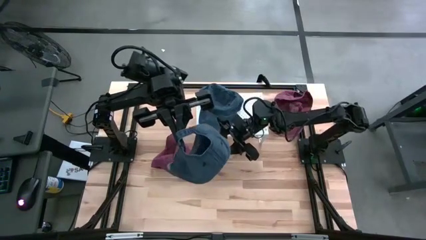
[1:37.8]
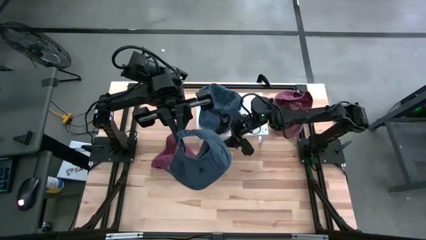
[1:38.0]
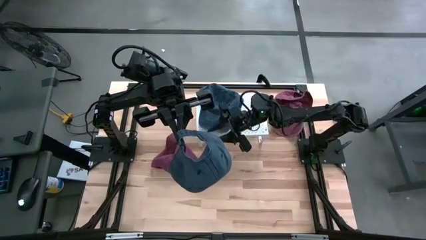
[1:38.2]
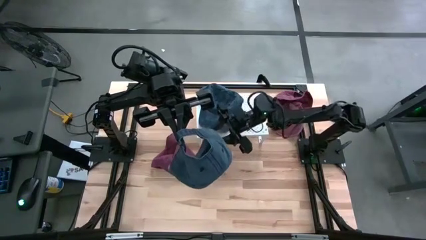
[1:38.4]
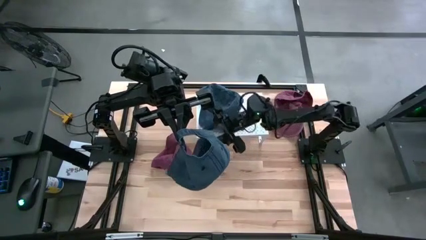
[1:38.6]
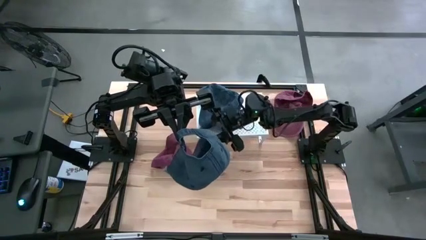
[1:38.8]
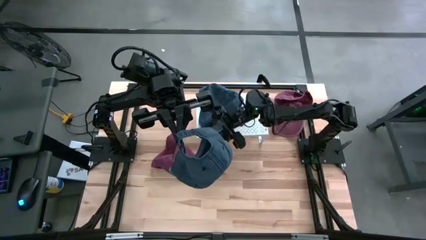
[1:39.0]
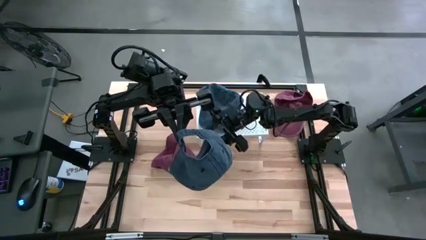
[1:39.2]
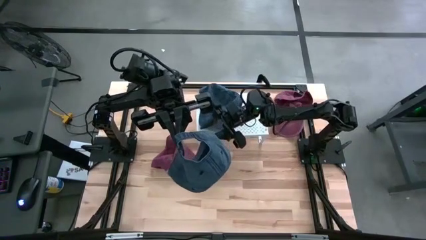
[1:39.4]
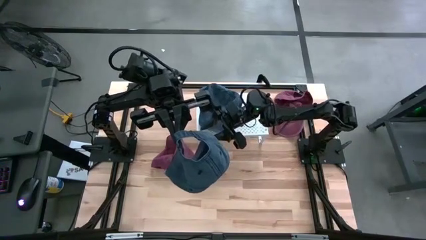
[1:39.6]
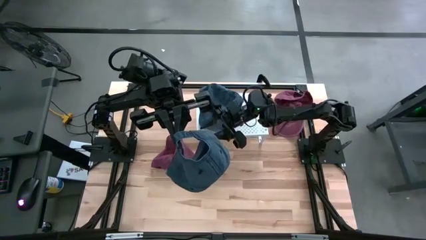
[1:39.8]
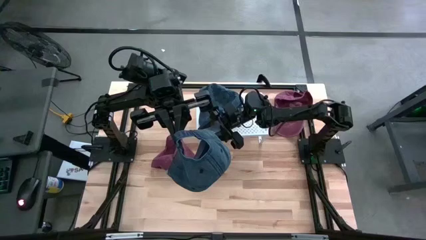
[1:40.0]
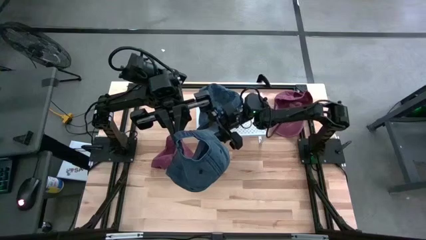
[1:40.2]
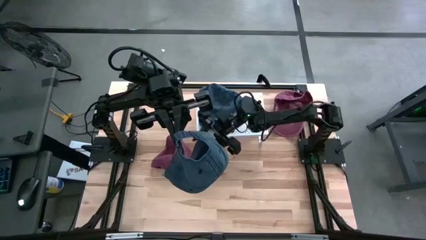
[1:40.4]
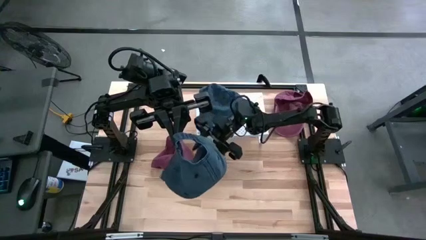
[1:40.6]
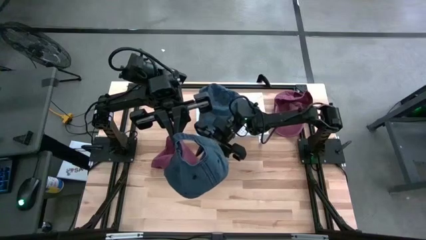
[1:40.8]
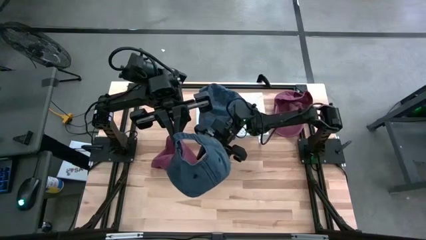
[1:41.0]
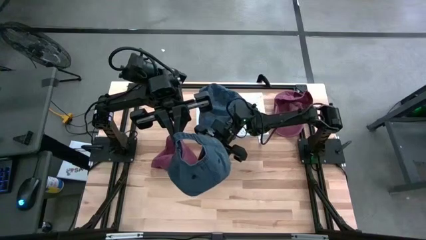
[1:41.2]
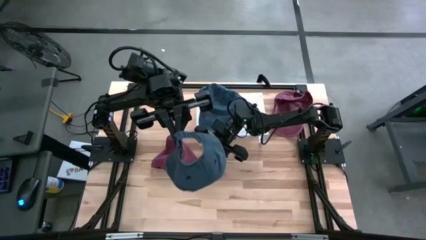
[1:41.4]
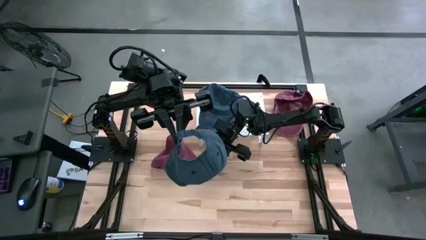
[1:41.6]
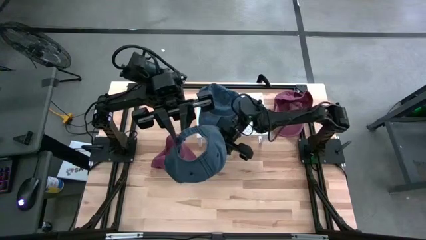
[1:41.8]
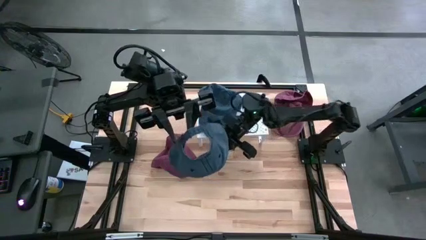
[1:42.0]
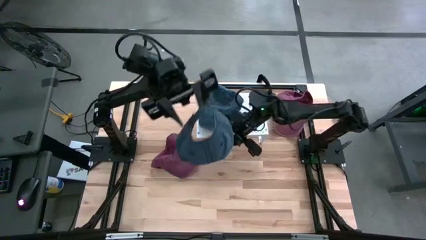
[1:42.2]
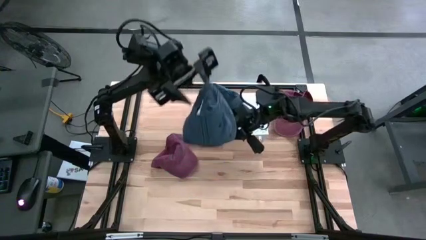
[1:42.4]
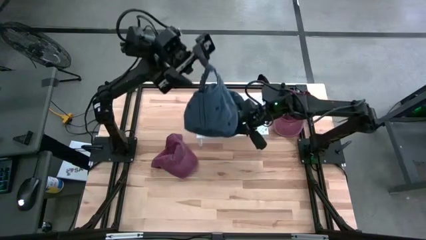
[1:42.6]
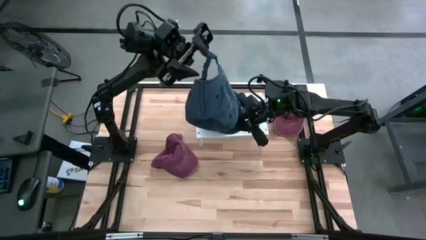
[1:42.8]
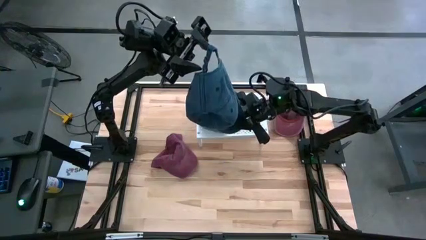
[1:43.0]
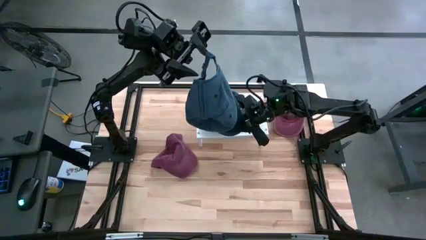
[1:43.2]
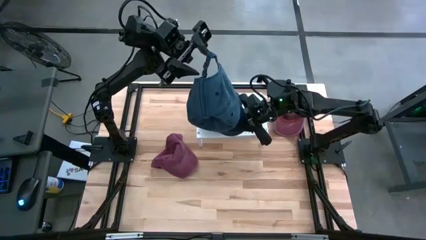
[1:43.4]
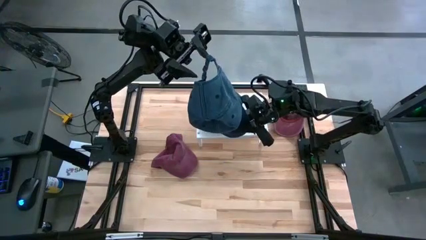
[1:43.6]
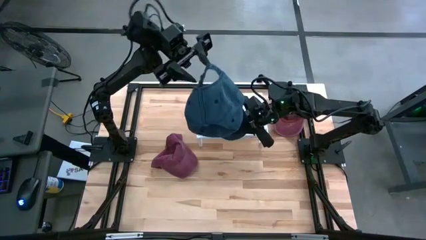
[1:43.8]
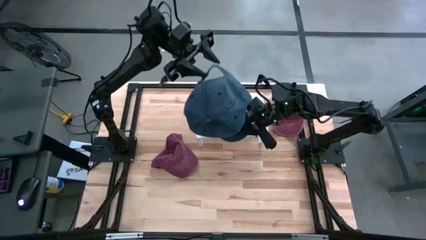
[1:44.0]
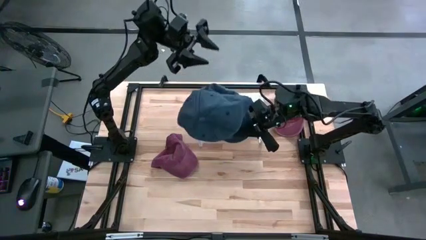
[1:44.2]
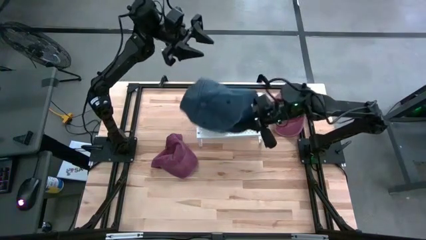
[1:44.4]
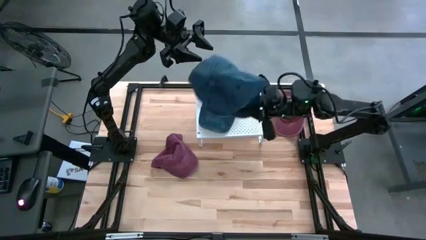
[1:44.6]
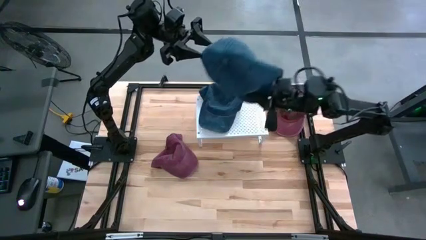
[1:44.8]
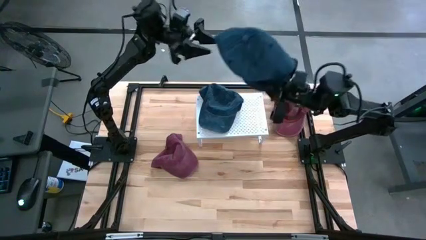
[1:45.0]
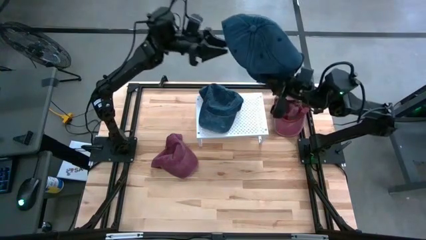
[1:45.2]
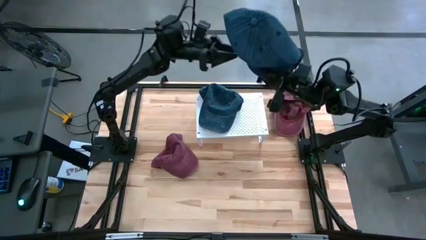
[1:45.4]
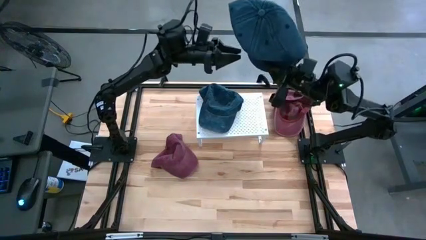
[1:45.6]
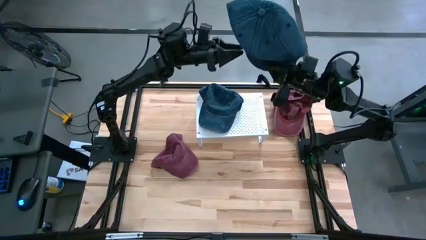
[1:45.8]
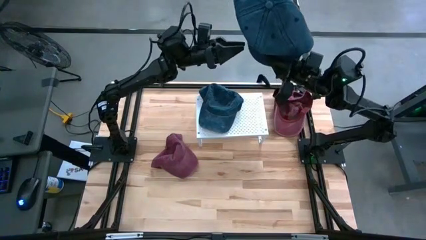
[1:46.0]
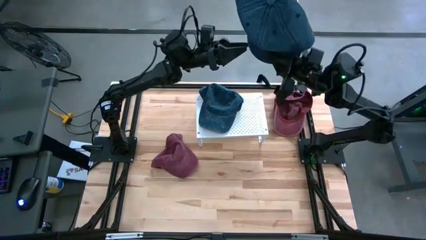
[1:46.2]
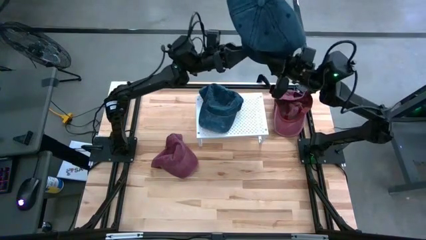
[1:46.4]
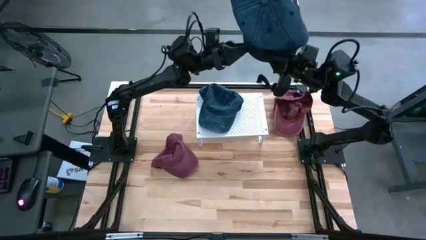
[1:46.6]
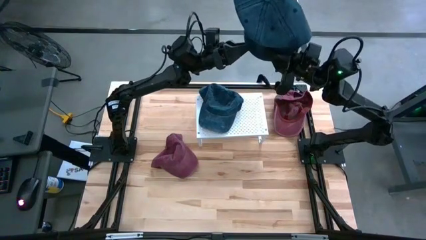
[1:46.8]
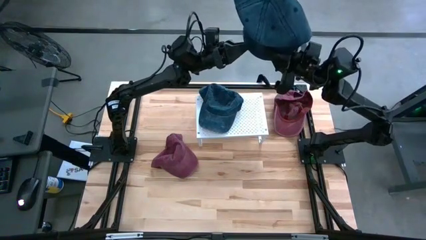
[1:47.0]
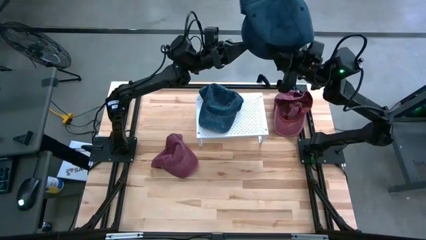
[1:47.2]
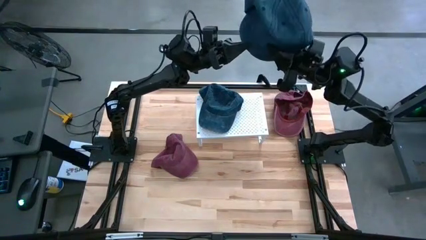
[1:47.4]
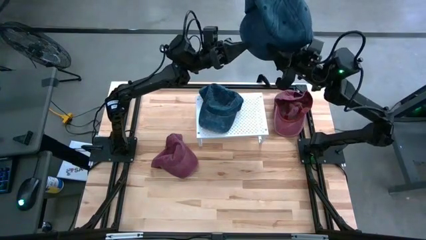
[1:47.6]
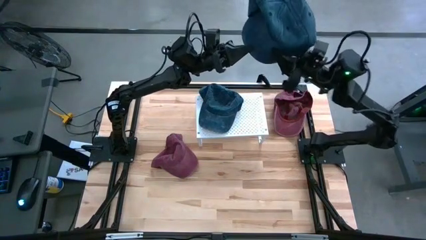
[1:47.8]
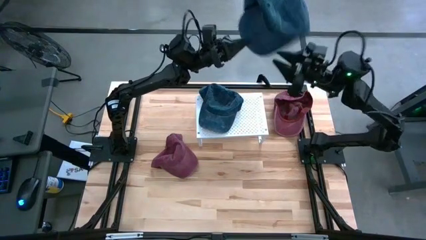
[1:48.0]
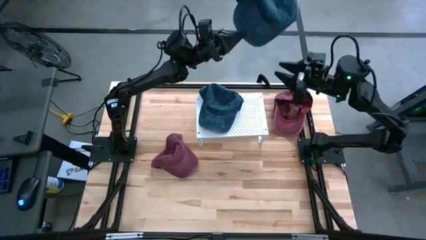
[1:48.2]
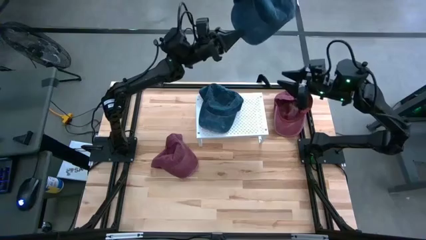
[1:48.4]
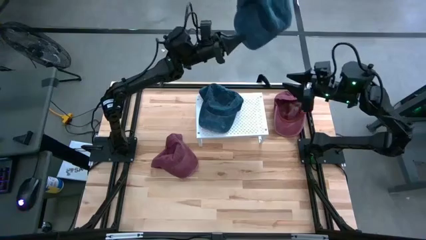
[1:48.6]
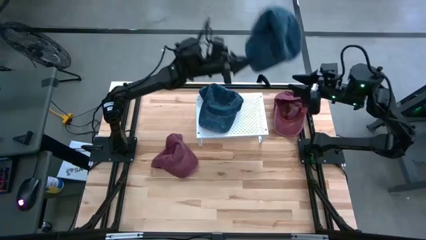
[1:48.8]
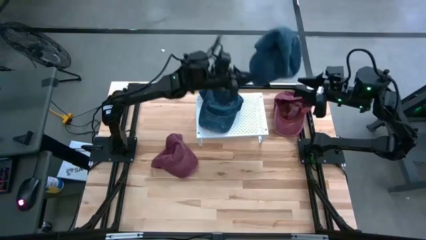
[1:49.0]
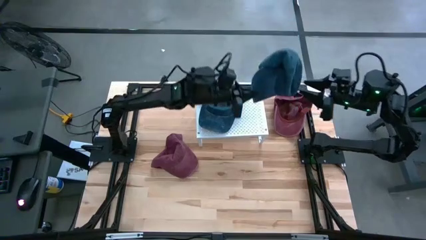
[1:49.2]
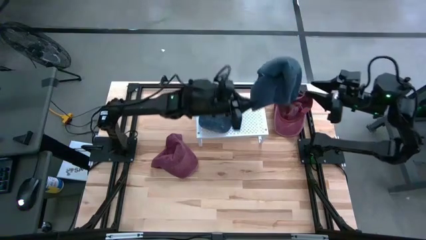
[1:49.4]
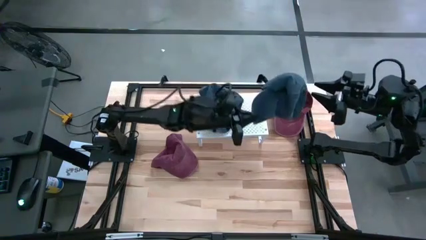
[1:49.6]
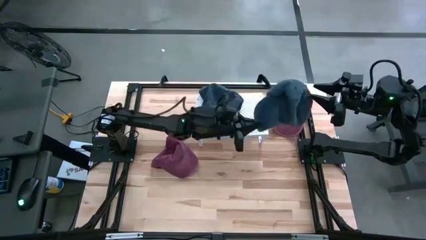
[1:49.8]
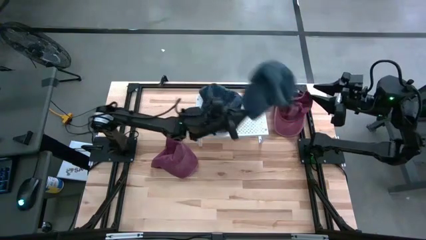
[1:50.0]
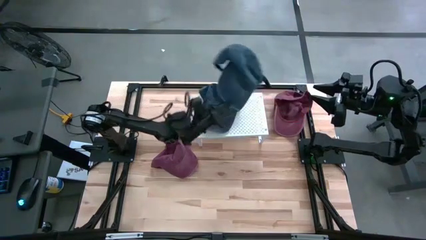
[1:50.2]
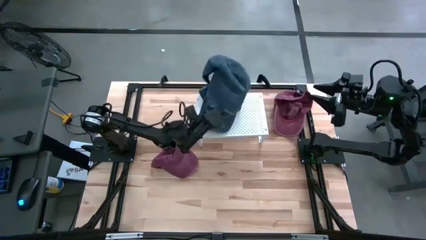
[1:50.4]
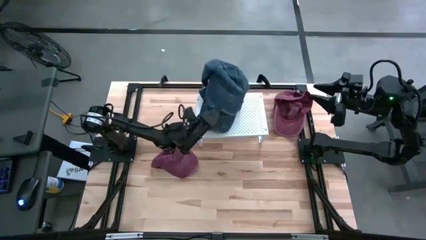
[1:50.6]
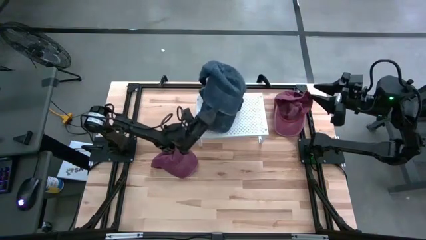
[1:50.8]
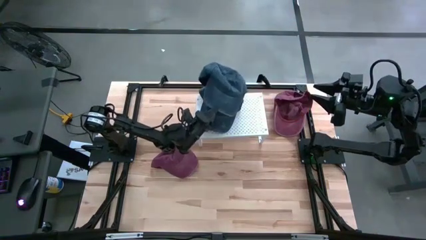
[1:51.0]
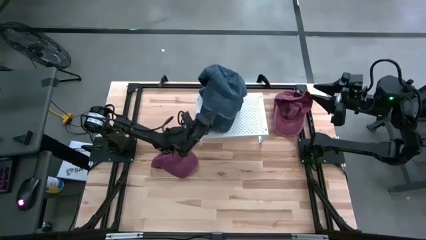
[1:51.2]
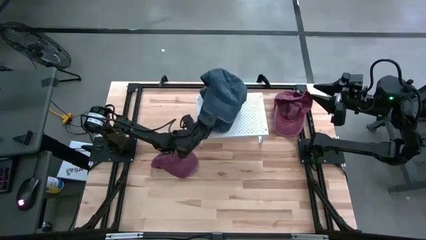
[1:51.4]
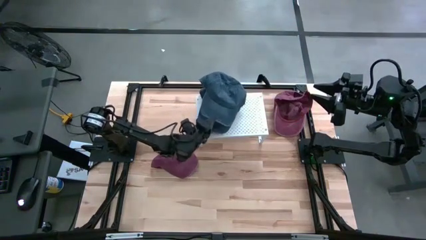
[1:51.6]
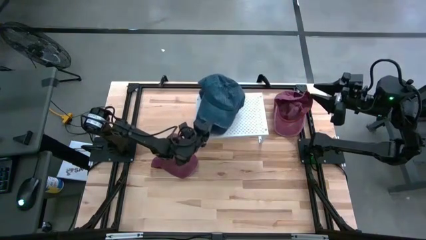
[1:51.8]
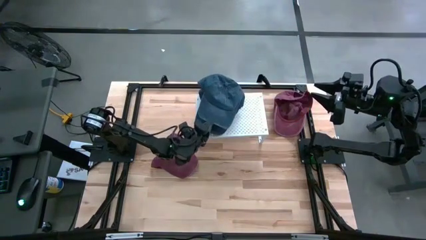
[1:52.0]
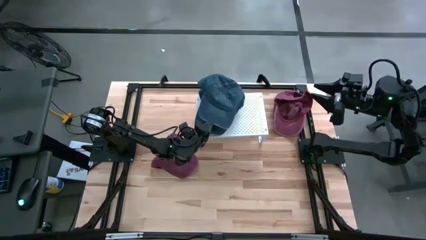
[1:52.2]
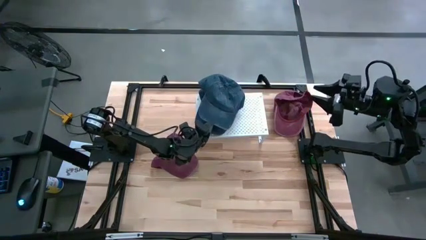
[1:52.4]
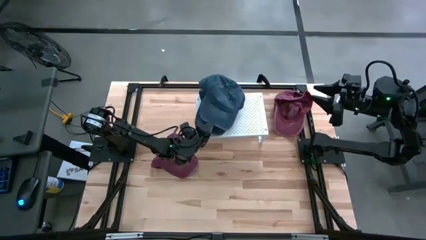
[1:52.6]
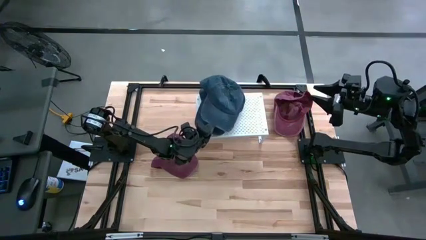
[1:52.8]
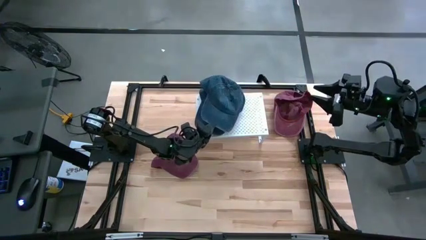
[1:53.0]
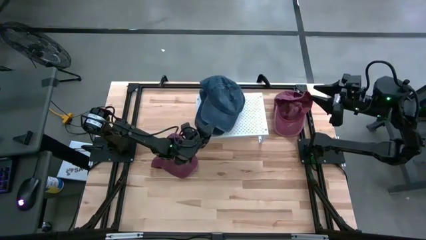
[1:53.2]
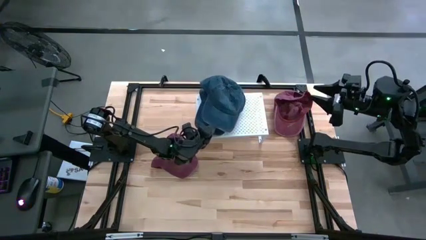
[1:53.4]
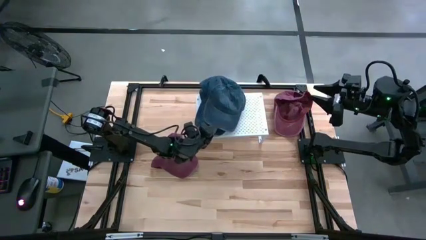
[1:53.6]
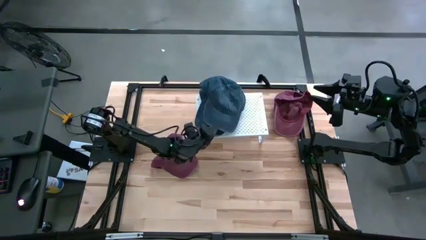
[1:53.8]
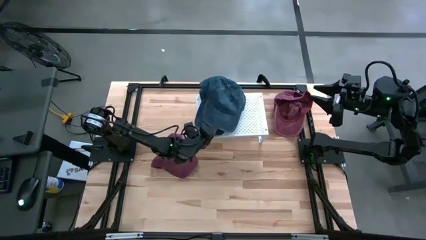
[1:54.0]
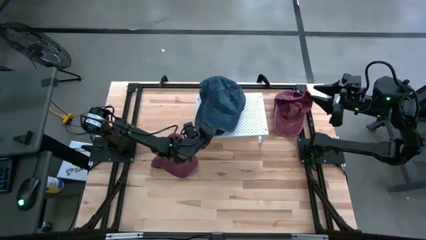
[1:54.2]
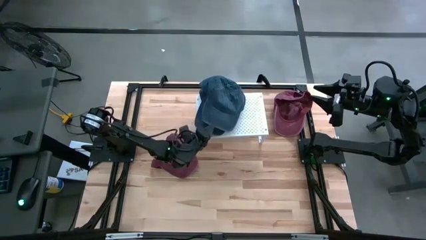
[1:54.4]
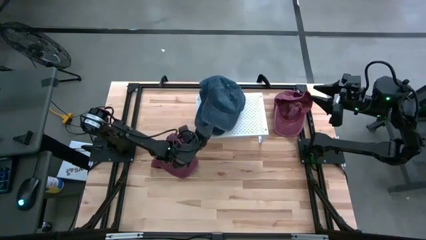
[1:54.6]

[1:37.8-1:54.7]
Task: Pick & Place hat
Stack the blue cap on top of the other blue cap on the shelf
